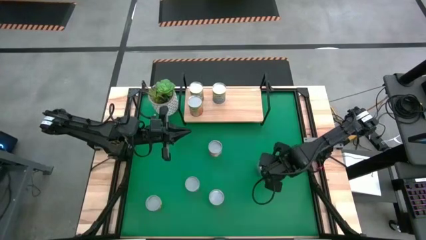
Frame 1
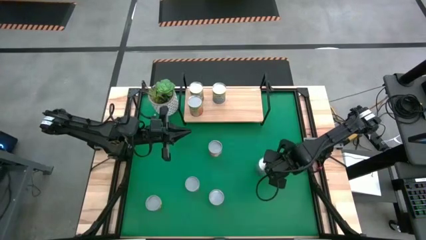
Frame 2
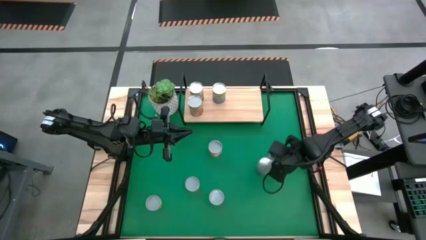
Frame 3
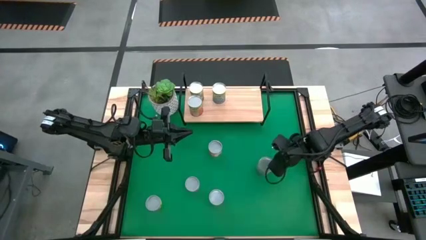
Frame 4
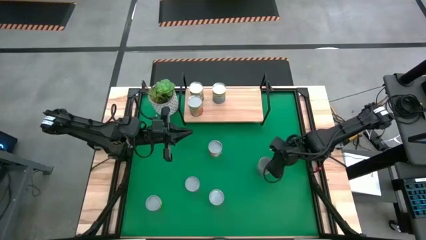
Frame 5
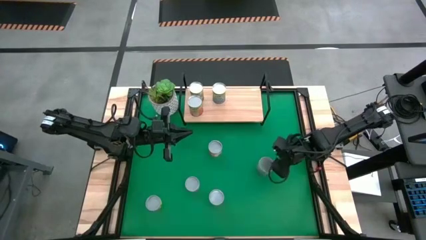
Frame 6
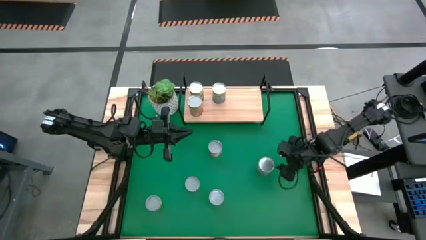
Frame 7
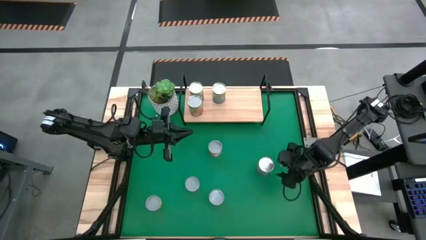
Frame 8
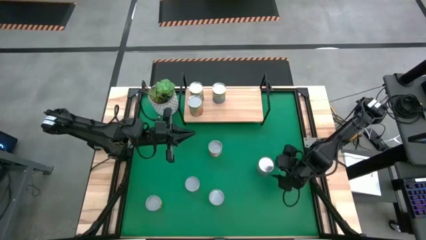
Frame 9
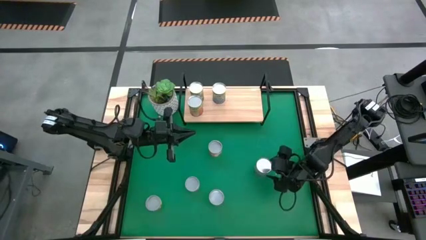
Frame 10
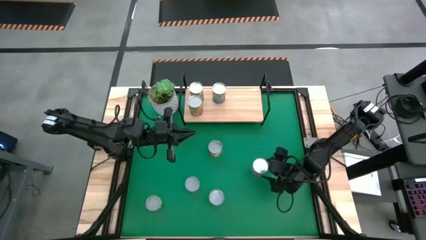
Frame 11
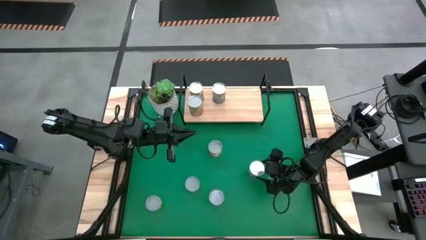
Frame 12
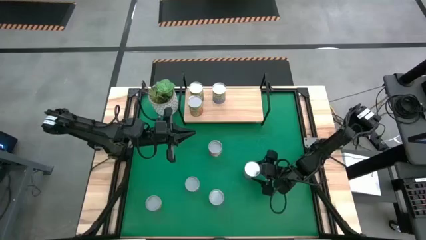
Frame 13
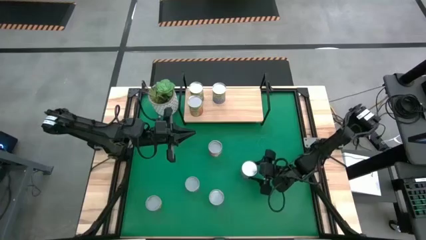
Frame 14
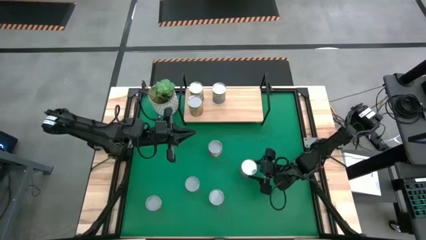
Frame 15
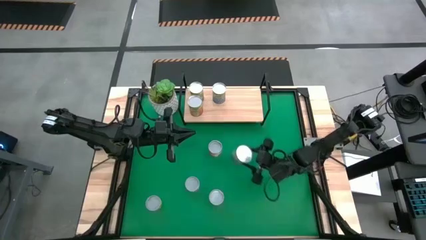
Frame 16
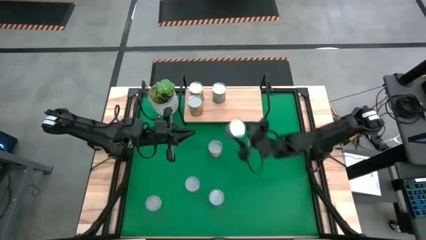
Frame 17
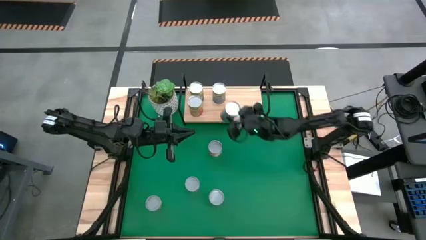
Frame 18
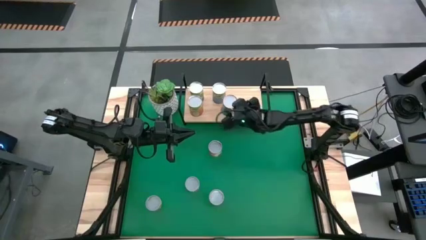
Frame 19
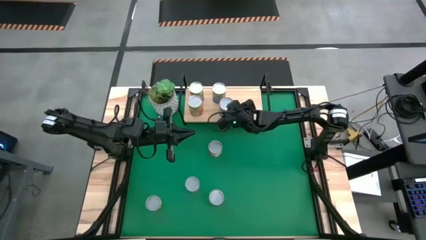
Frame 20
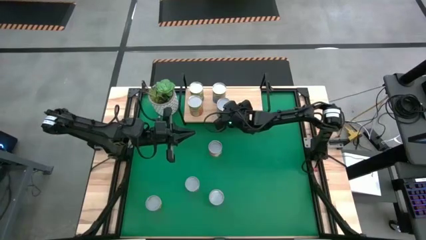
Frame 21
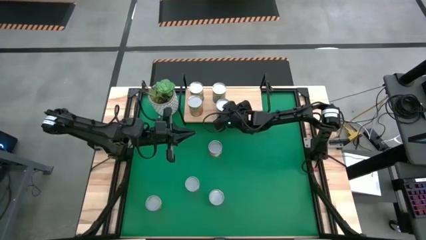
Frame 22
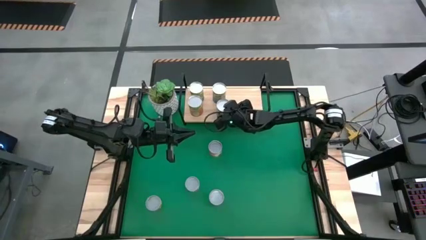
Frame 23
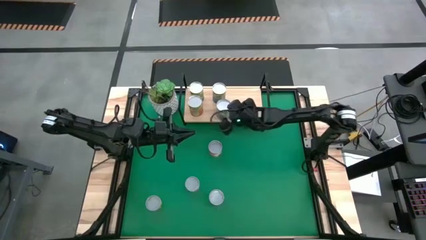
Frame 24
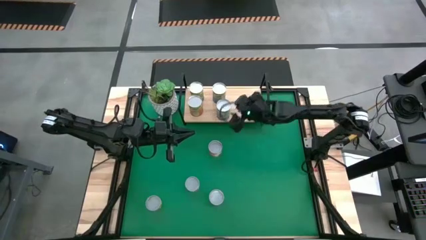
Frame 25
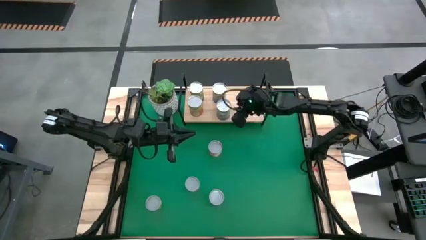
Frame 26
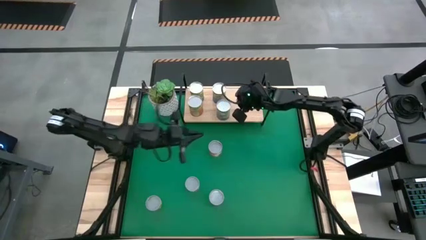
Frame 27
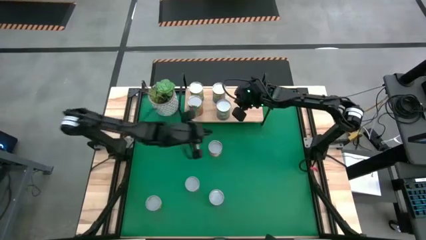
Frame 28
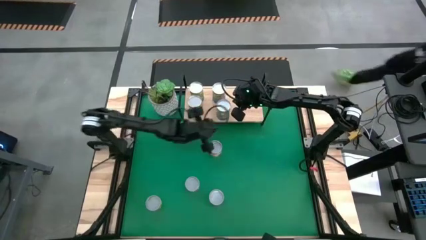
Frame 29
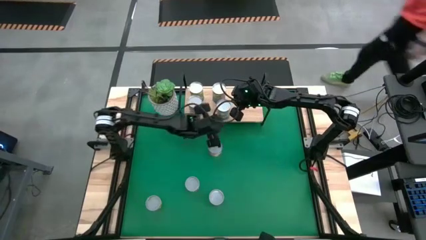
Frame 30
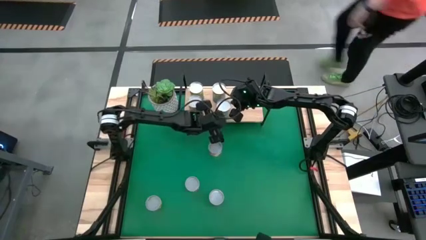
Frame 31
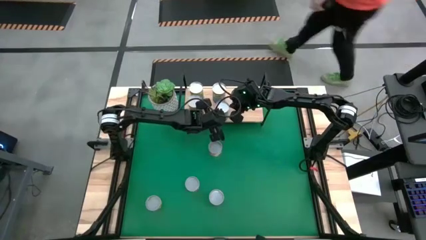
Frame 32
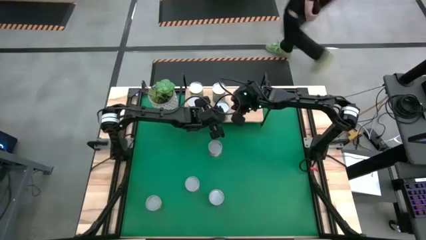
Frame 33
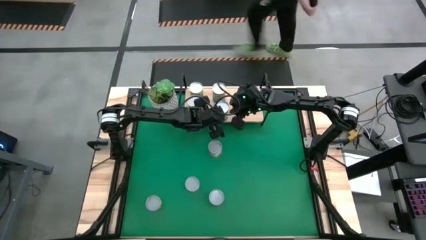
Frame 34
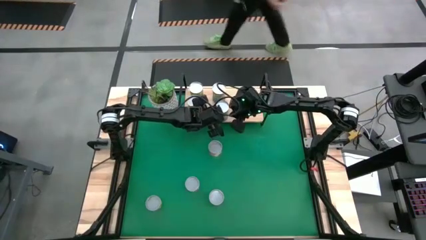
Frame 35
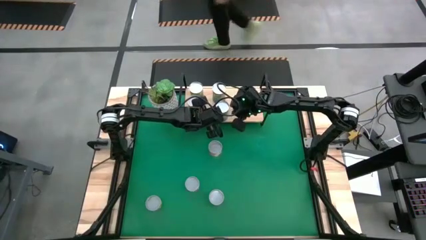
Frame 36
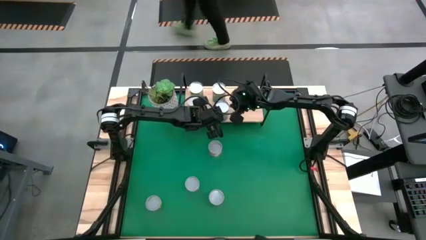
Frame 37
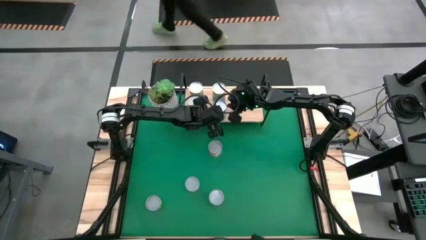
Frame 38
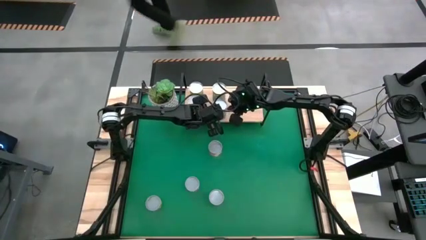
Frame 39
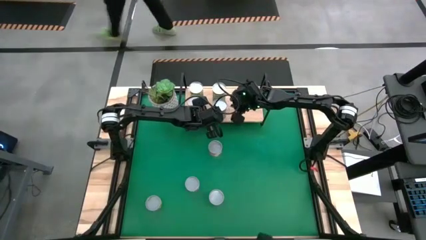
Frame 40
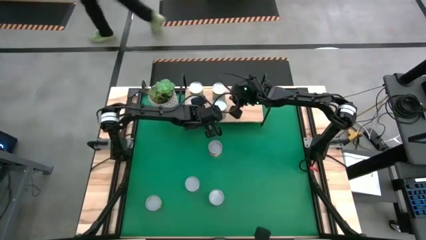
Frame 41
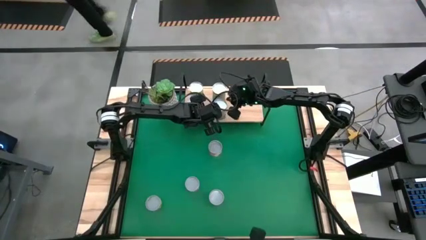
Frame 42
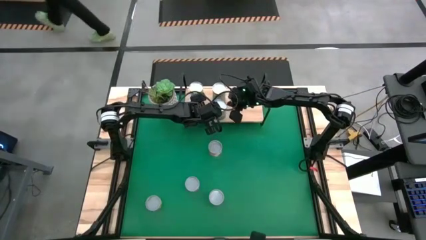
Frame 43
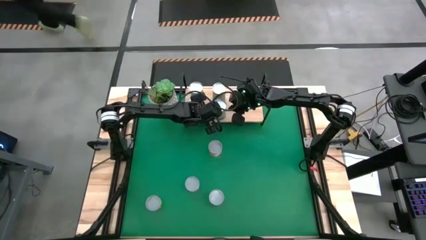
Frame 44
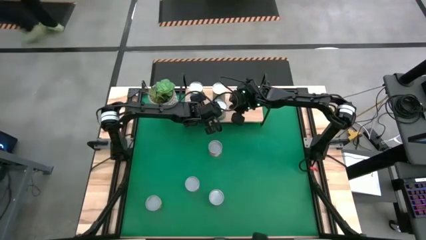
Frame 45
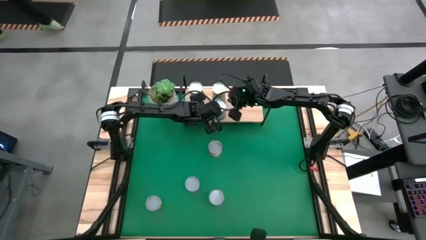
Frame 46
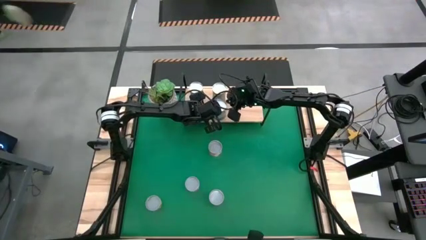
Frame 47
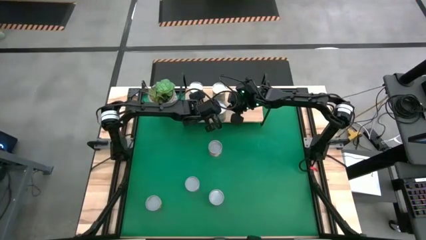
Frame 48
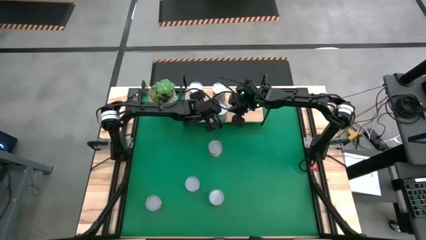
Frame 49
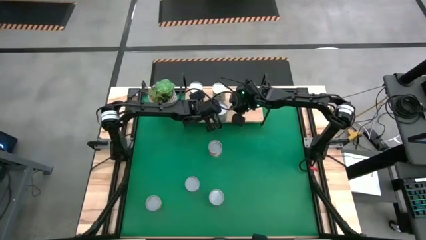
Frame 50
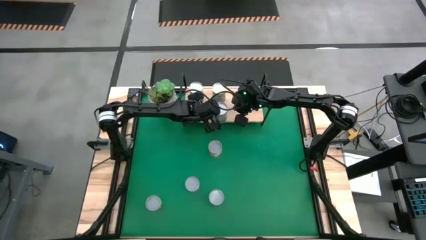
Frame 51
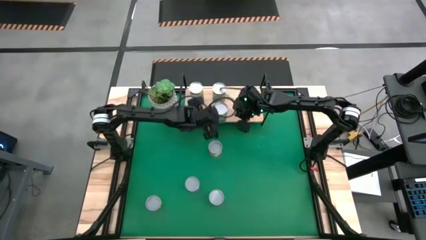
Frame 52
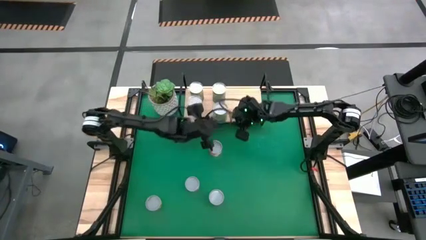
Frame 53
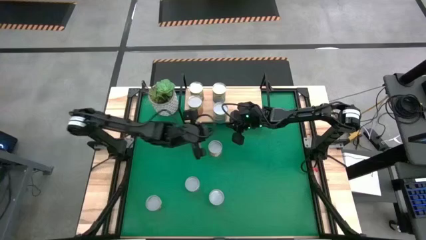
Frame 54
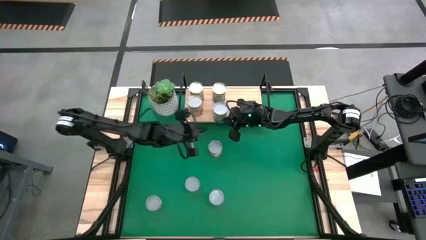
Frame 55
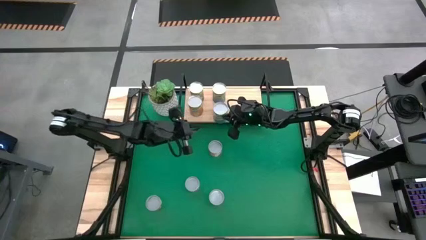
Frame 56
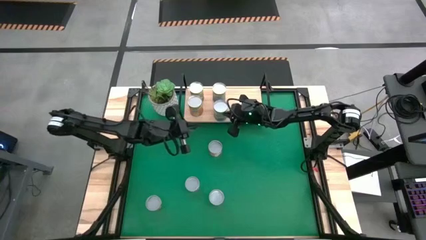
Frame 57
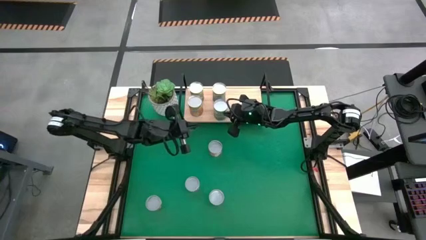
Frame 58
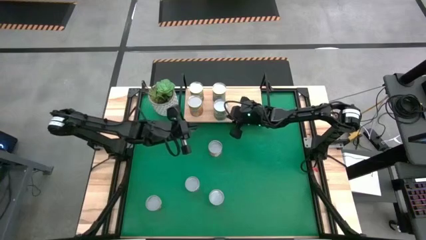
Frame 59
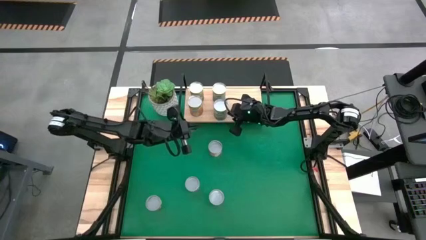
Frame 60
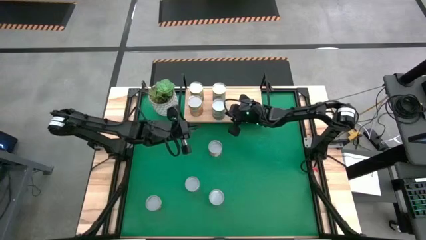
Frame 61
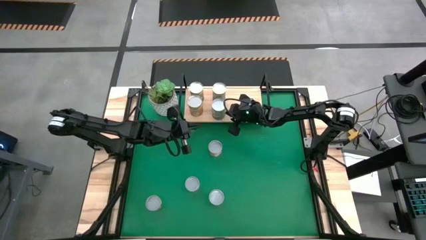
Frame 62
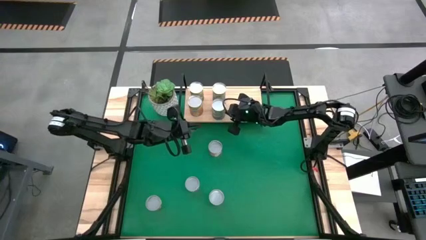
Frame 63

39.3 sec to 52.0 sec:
Task: Pick and place cans onto a shelf
Put the canned peas on the shelf

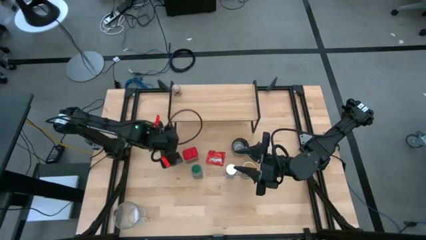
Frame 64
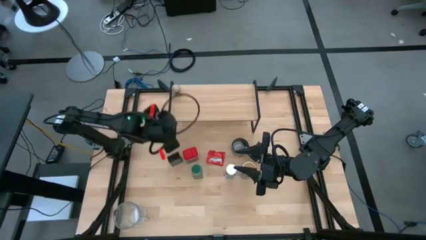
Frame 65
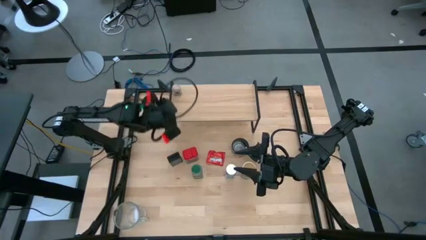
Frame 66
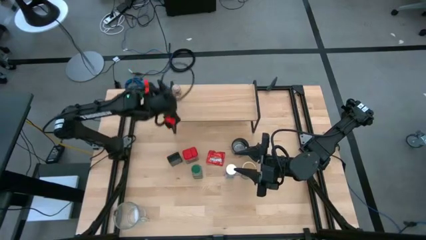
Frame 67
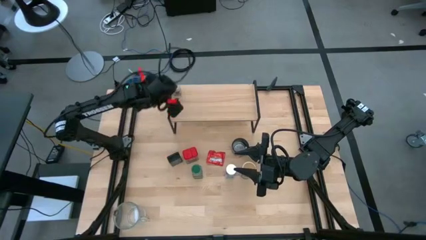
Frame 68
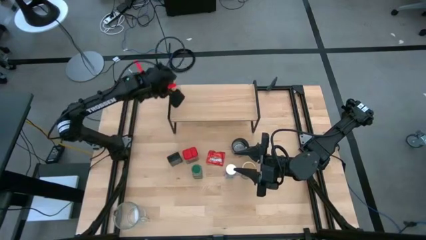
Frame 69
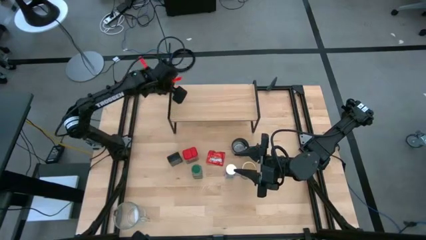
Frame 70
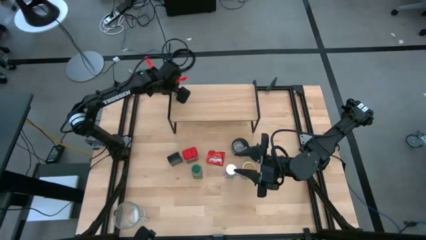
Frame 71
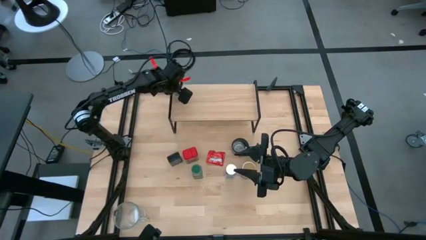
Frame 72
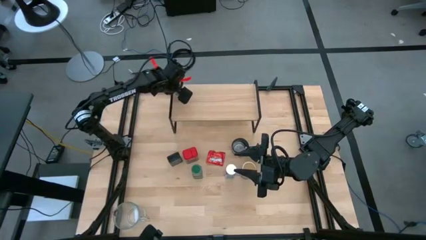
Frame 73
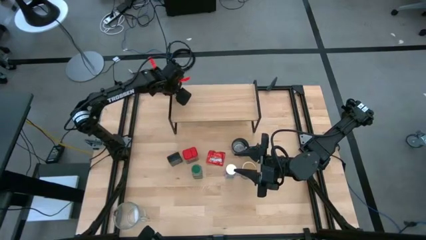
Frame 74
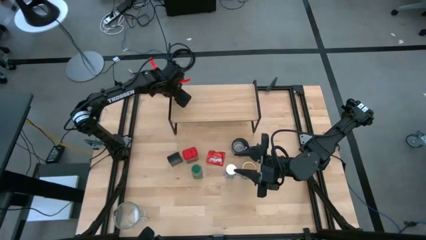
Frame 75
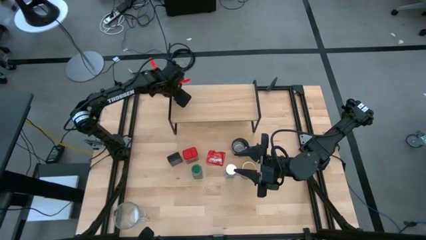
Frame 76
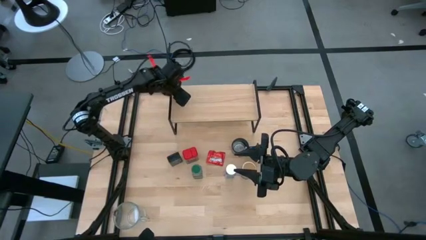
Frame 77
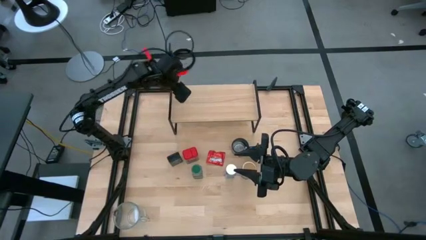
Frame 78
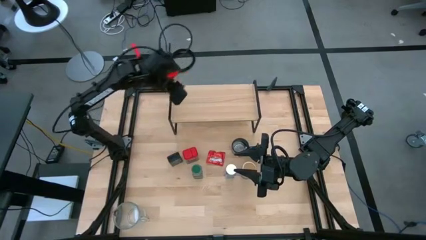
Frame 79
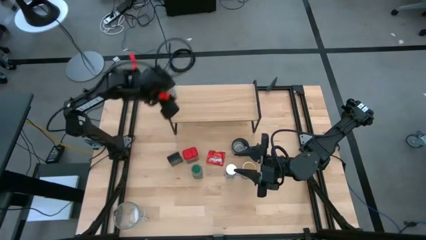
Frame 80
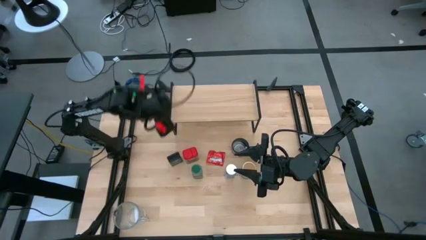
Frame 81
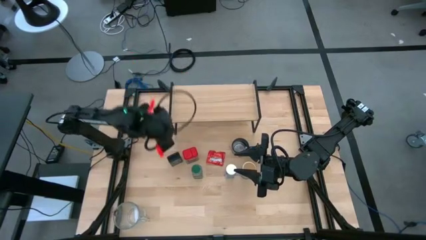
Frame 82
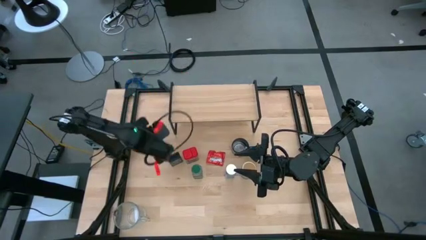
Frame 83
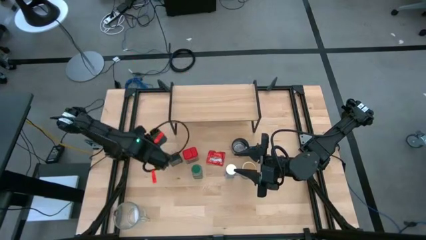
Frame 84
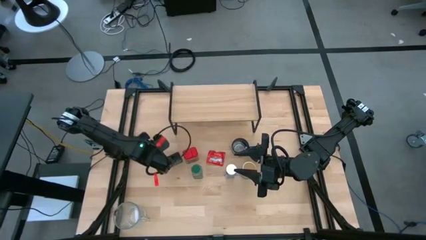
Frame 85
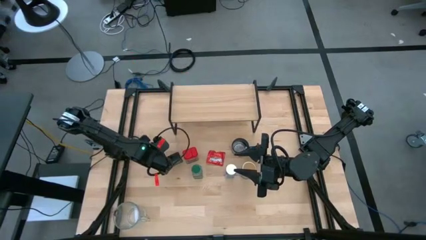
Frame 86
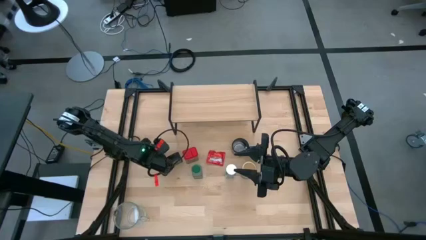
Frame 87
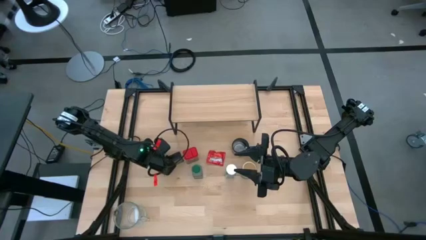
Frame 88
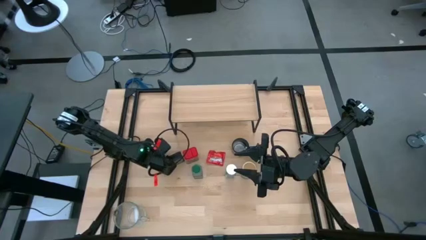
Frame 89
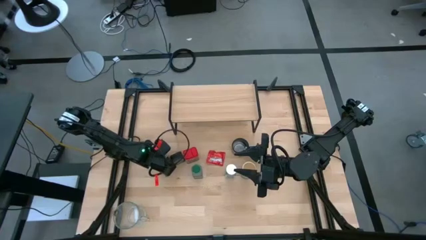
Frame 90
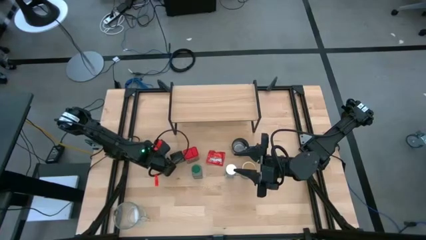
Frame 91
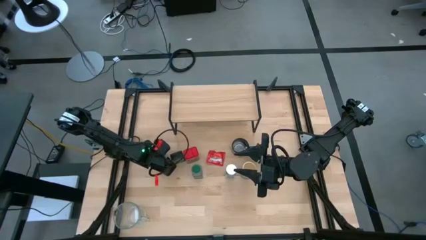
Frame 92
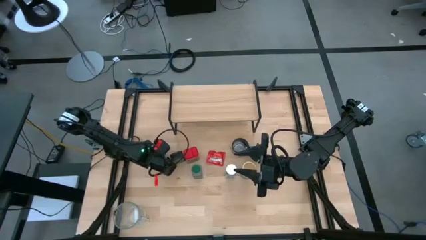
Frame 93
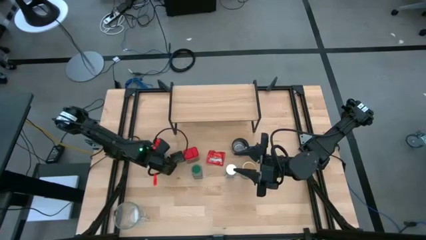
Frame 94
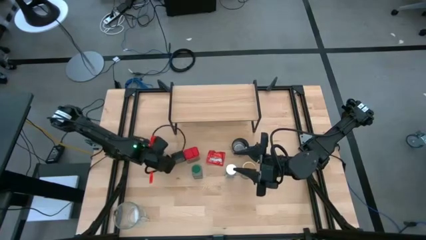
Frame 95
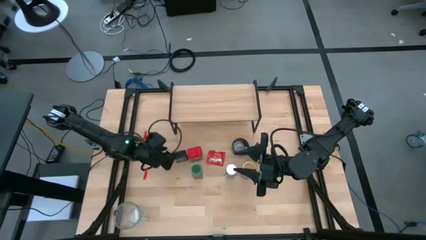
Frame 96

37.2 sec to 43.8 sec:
Task: Shelf spices
Remove the brown seasoning bottle from the shelf
